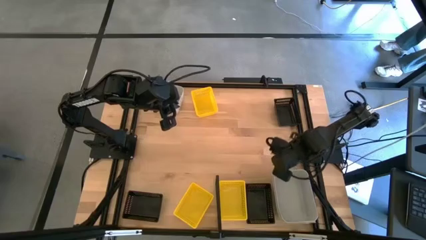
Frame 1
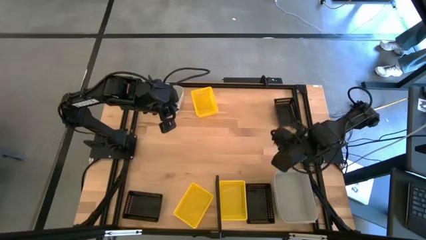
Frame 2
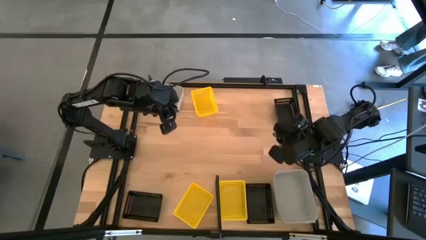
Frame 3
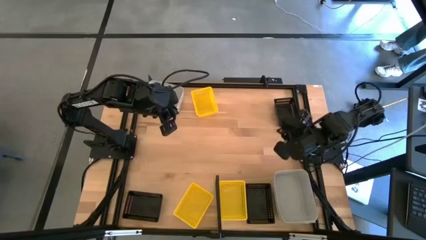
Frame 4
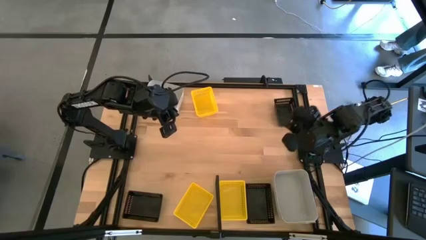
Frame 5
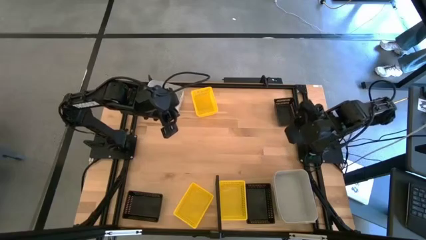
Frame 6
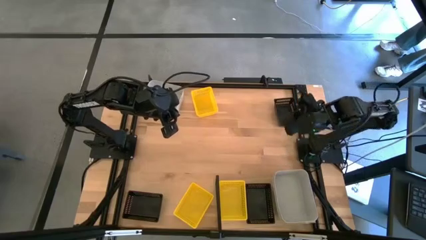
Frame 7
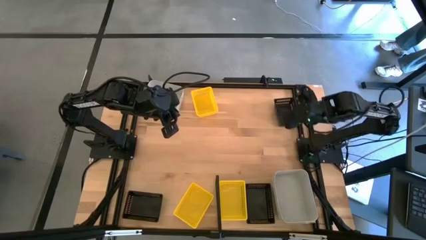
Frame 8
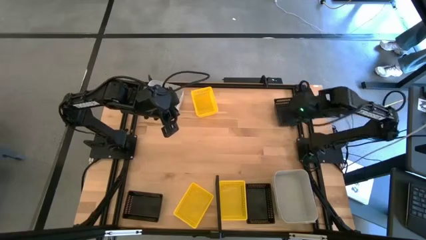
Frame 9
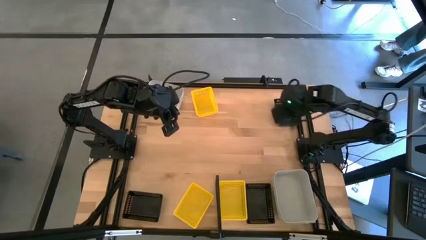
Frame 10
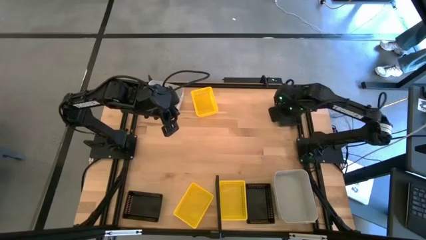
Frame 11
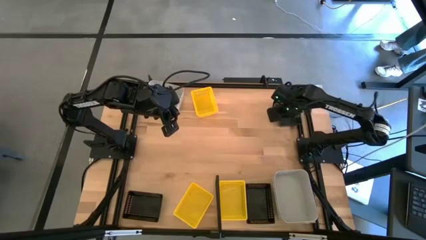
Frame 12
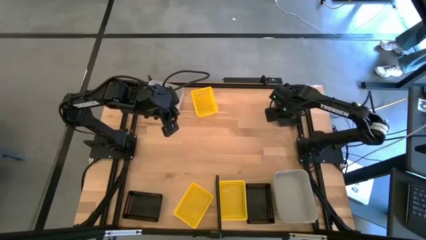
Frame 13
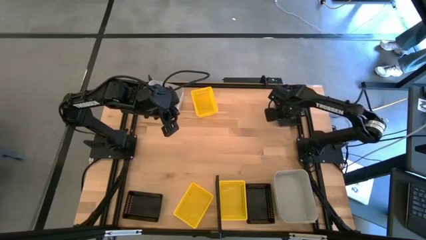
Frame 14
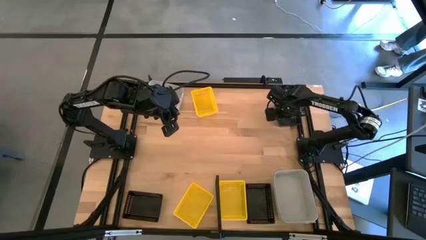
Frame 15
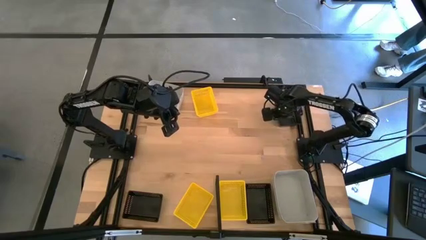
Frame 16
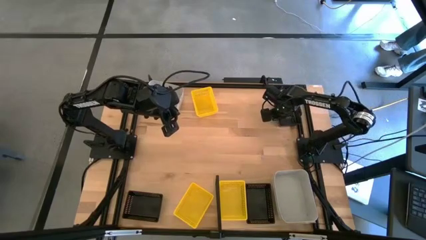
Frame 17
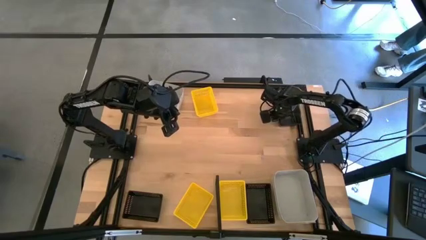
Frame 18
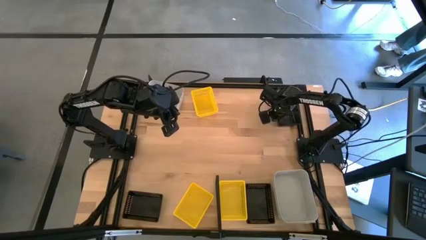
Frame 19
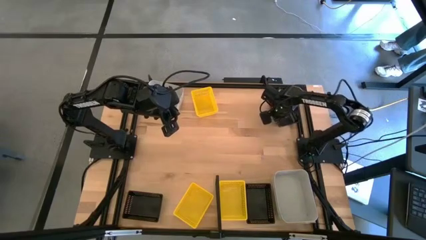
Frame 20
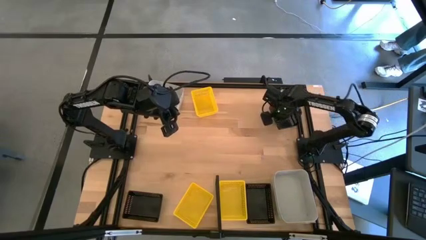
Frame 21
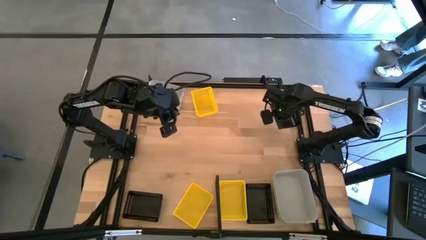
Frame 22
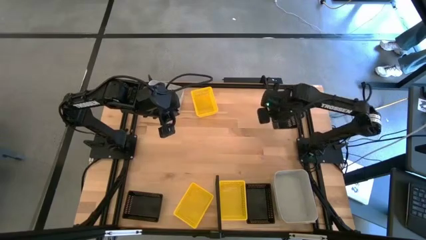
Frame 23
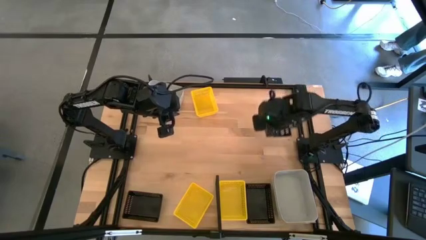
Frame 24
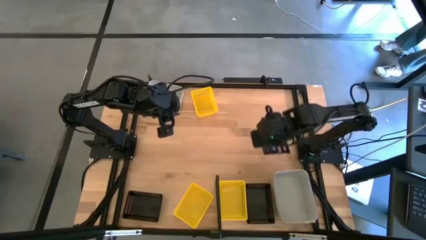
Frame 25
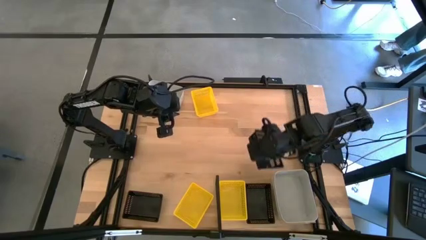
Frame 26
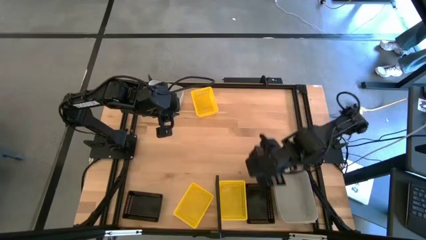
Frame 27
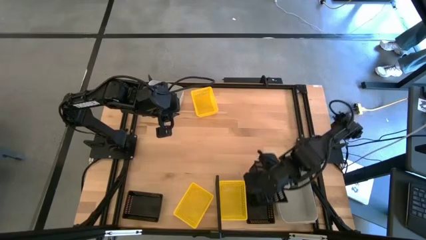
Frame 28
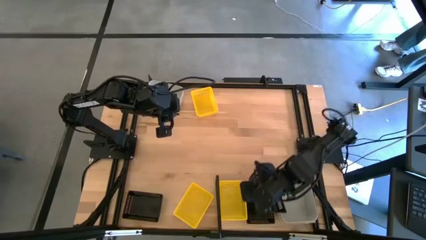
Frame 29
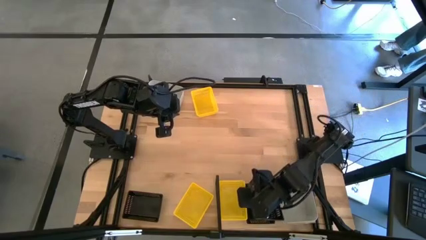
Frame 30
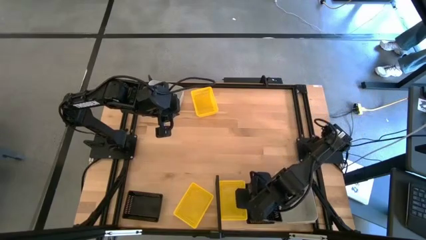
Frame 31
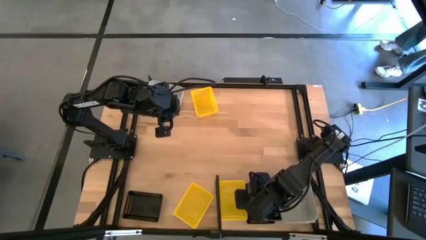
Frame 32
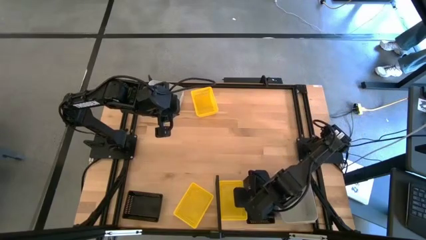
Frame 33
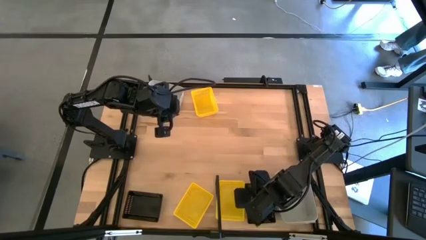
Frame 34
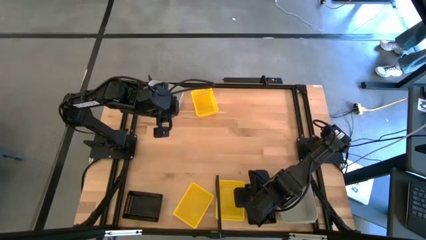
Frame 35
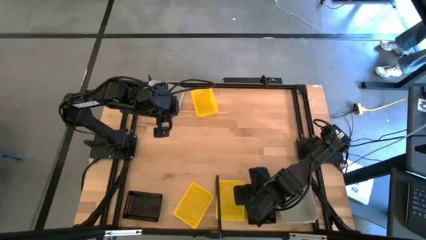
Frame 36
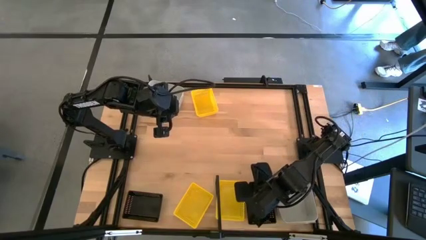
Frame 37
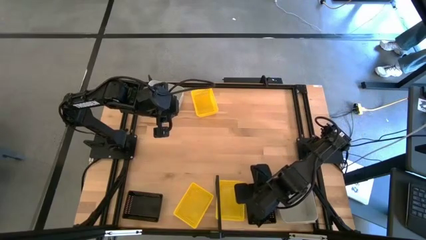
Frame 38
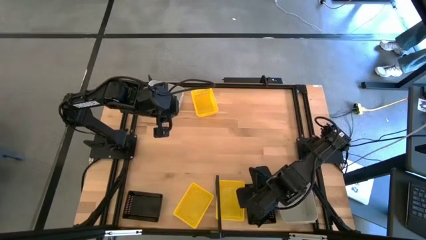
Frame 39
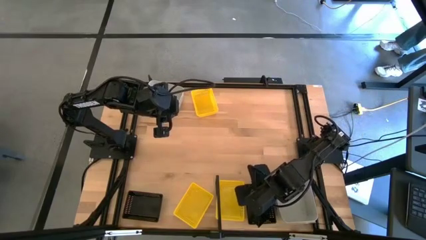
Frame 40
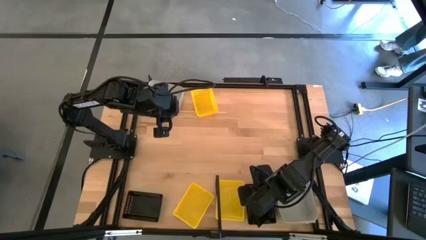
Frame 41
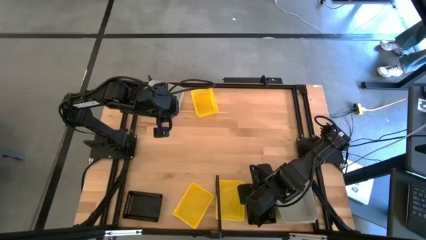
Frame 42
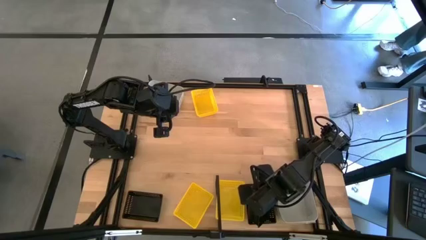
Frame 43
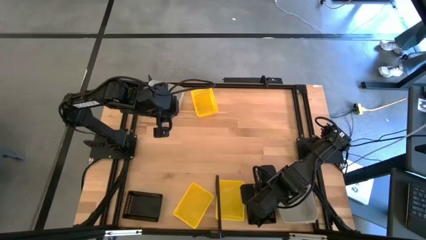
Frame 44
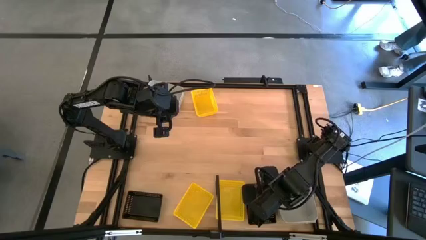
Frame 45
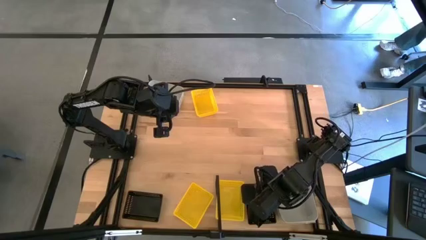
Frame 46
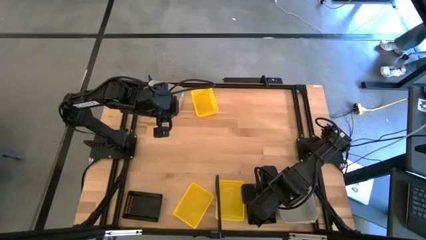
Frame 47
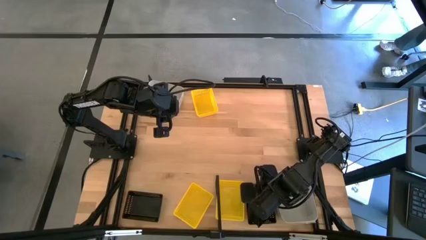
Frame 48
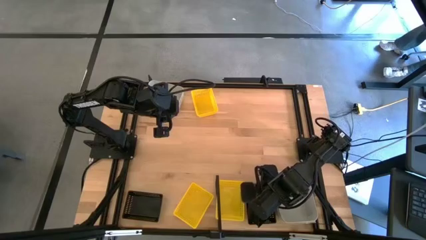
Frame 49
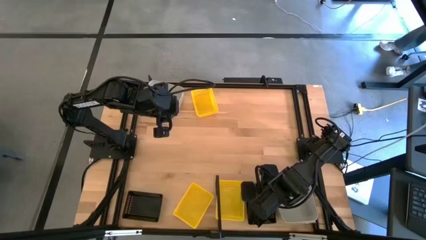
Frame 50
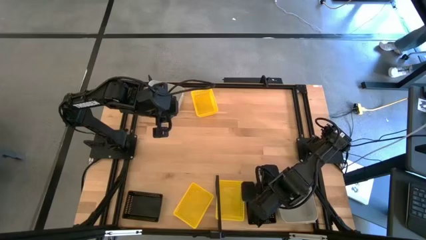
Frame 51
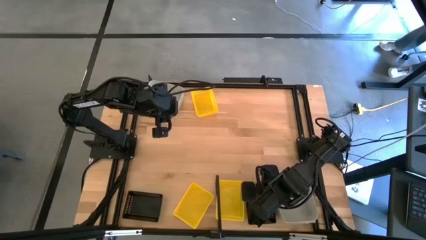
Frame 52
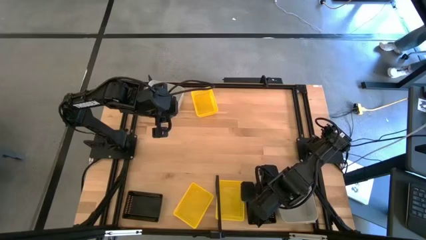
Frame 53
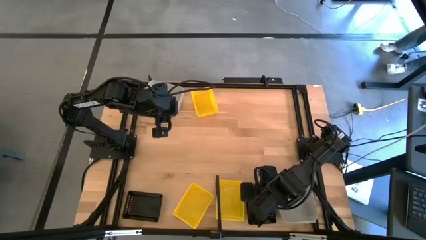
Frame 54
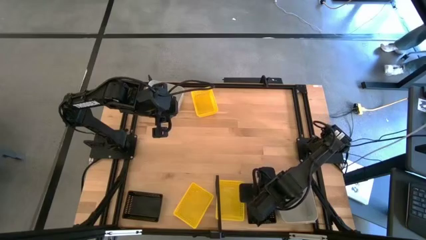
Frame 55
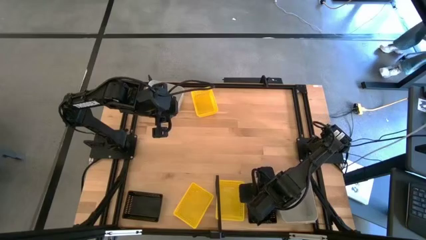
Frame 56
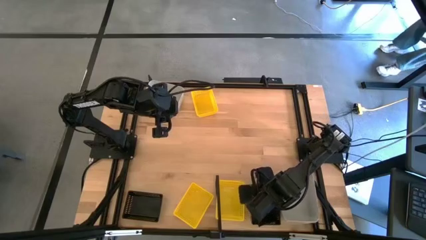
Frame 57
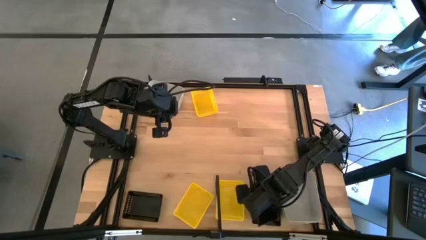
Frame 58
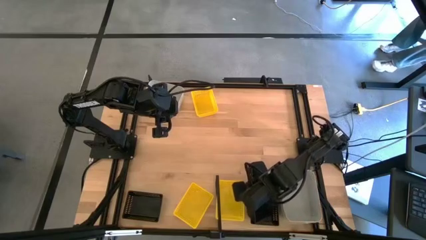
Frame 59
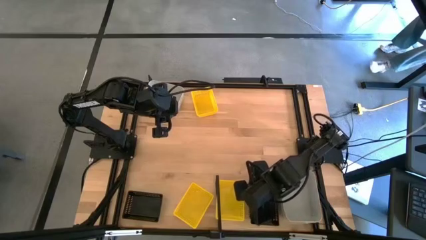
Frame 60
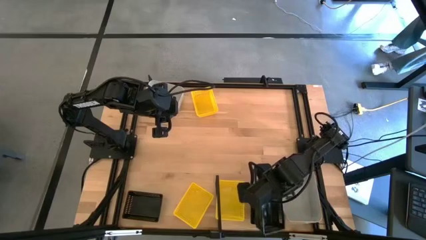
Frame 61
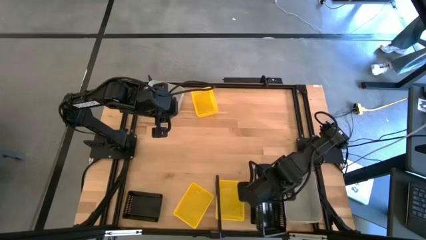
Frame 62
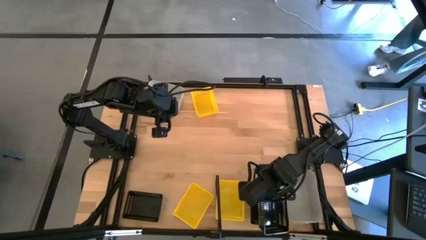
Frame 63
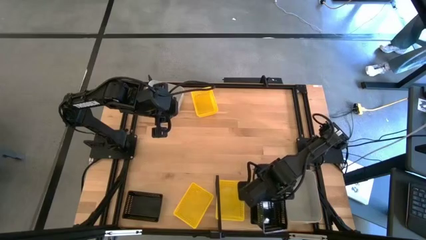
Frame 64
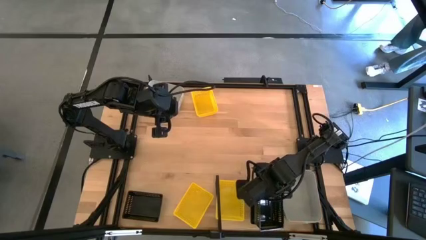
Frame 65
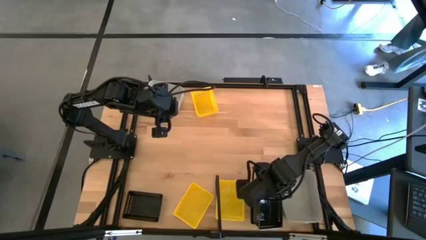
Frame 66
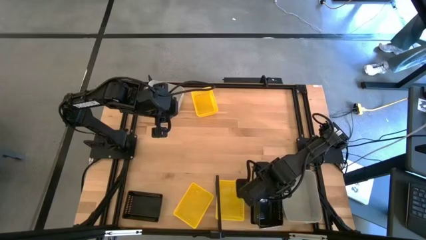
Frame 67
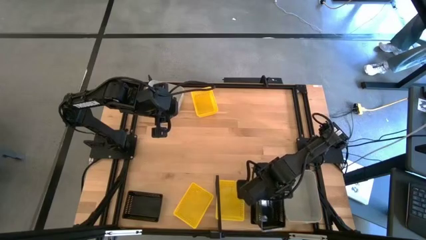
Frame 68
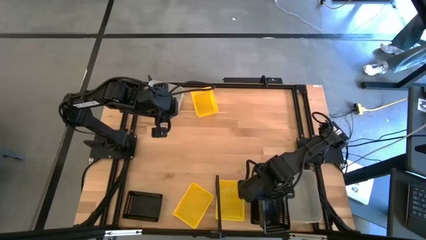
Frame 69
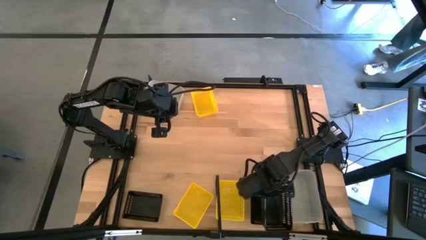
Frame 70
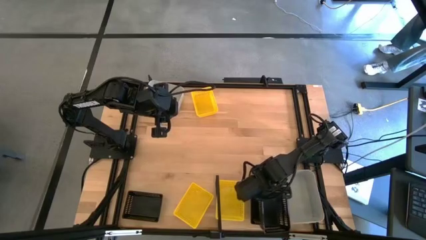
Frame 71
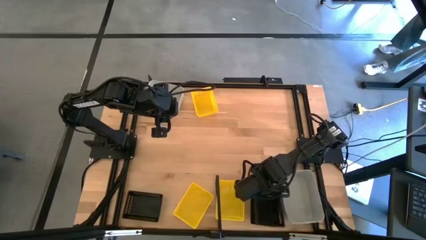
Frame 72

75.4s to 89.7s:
Task: Stack baskets on shelf by color
Stack the top black bin on top of the black bin on the shelf

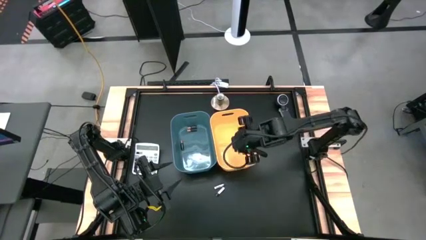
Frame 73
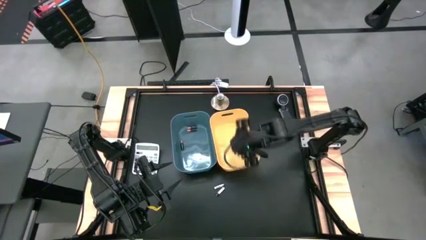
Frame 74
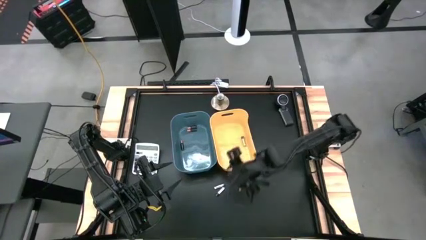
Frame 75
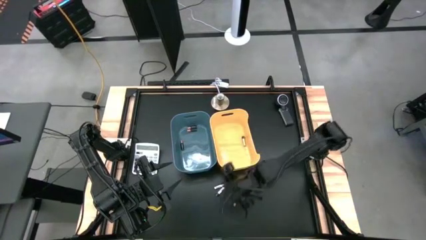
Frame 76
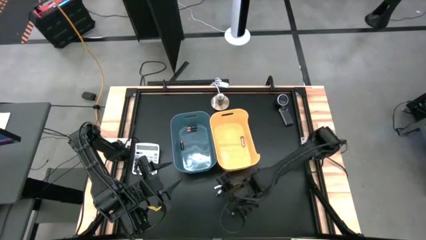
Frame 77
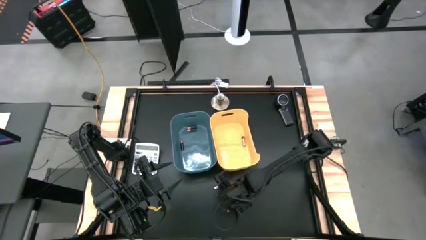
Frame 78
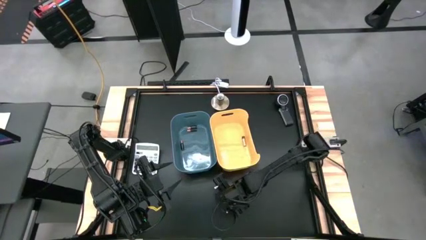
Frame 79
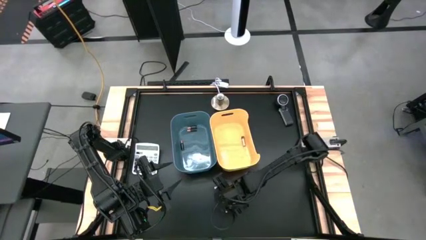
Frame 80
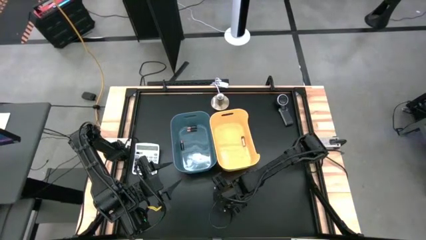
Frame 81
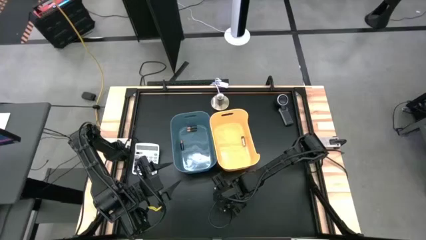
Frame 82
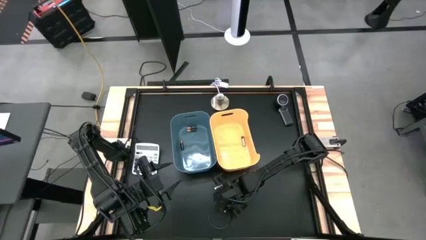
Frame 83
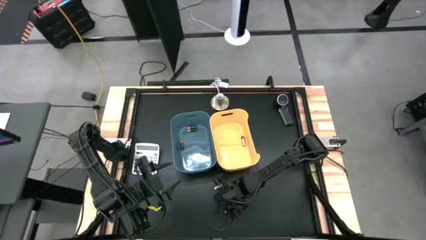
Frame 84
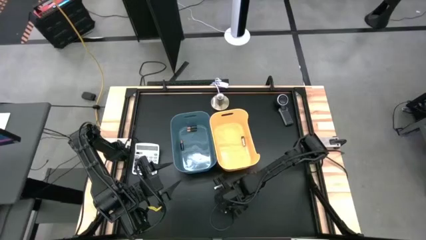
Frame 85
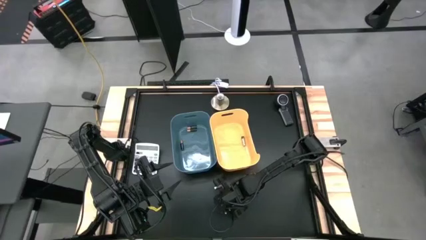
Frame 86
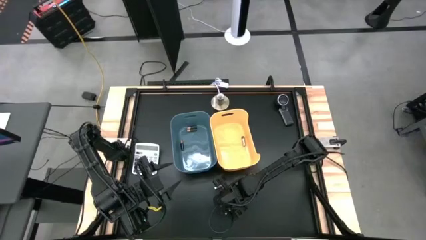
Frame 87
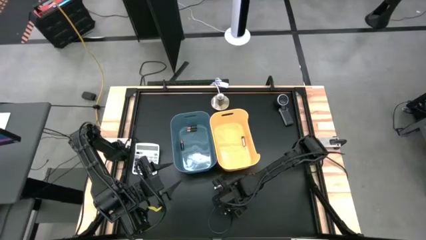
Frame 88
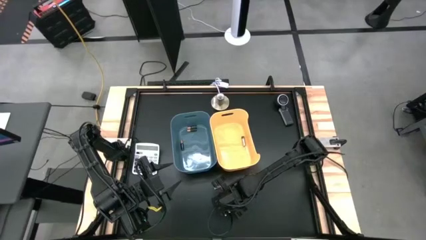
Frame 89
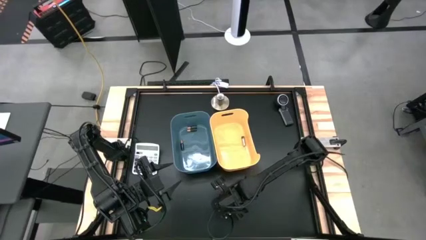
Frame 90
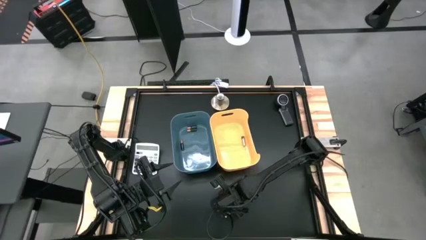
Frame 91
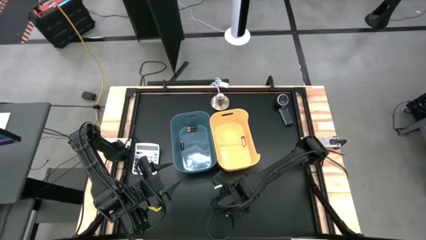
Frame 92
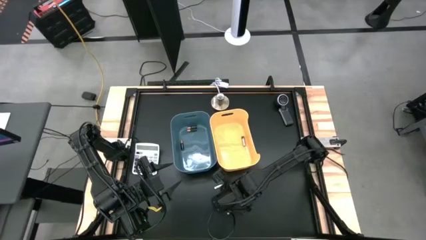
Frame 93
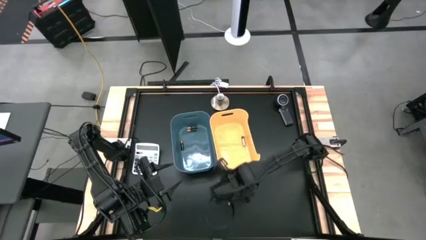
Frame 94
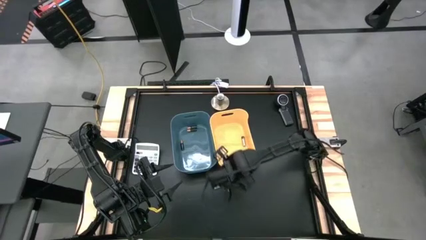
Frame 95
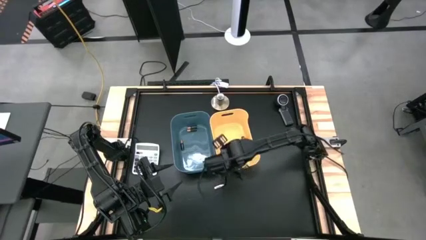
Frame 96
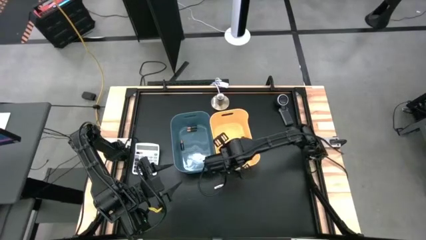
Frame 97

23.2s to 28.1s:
Task: Sort batteries
Put the bottom silver battery into the yellow bin
